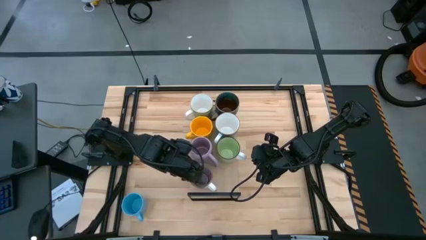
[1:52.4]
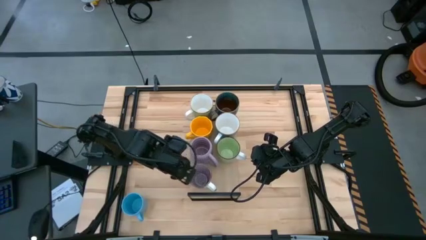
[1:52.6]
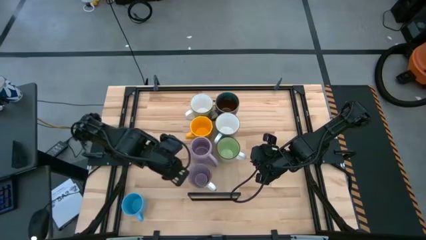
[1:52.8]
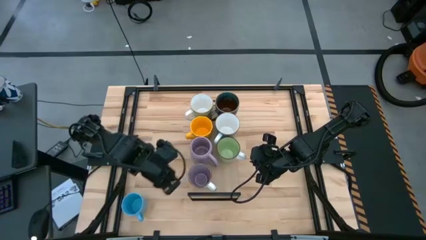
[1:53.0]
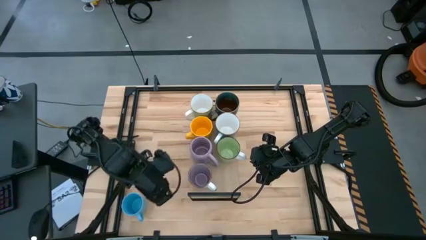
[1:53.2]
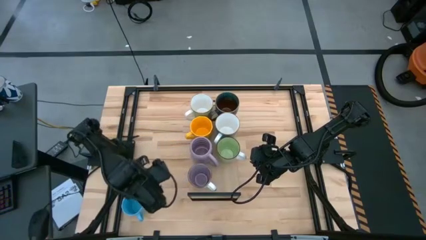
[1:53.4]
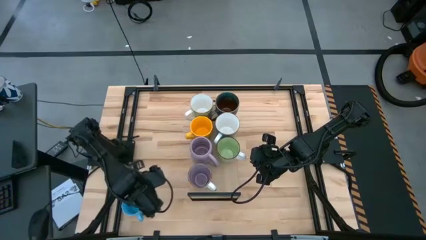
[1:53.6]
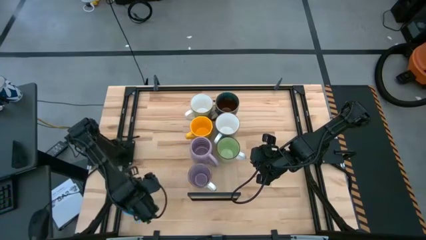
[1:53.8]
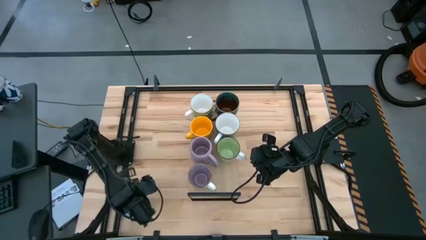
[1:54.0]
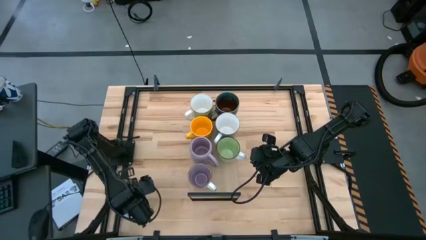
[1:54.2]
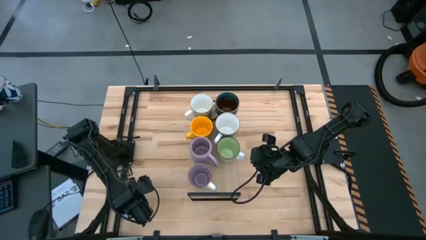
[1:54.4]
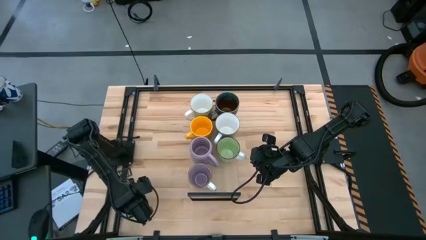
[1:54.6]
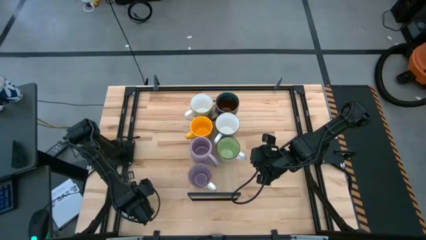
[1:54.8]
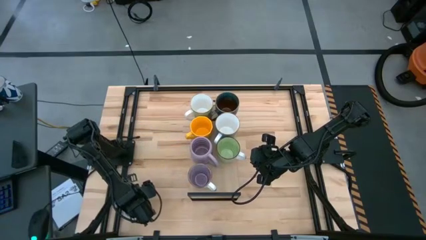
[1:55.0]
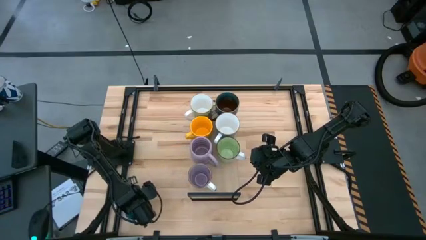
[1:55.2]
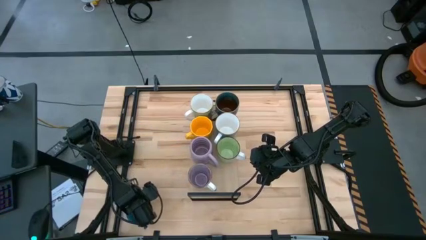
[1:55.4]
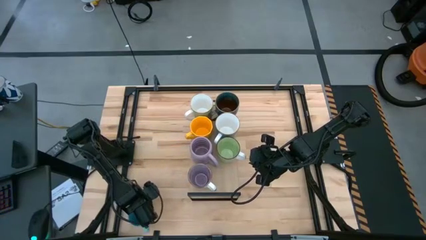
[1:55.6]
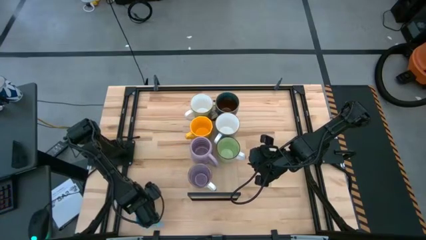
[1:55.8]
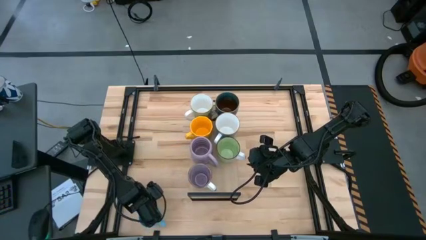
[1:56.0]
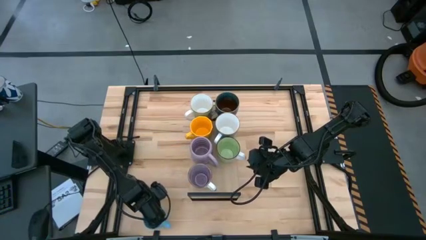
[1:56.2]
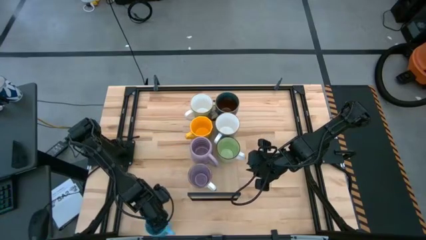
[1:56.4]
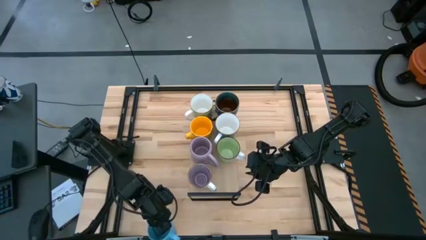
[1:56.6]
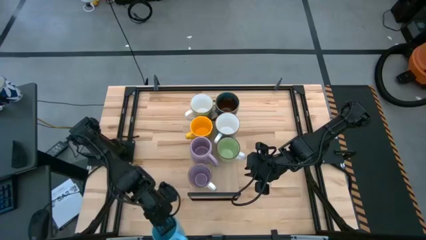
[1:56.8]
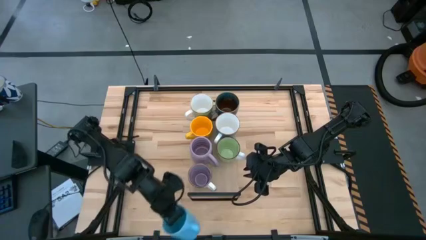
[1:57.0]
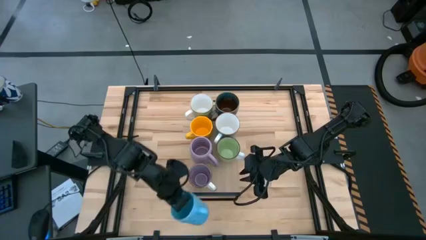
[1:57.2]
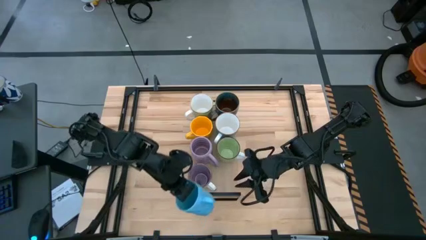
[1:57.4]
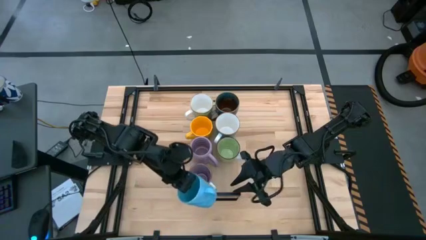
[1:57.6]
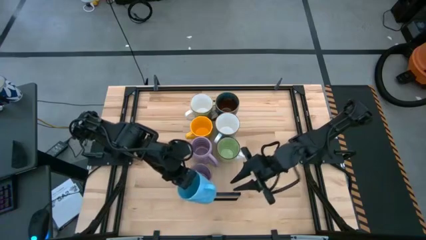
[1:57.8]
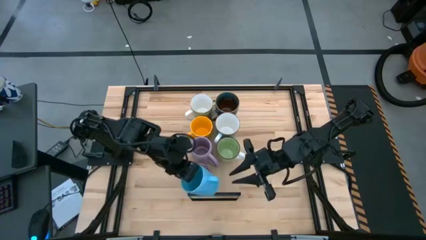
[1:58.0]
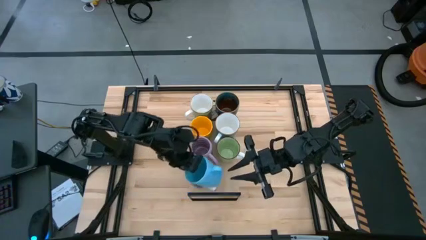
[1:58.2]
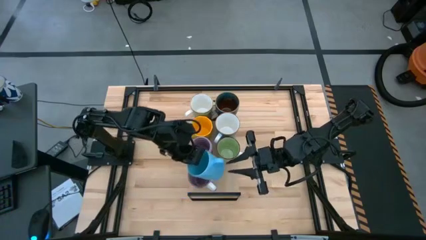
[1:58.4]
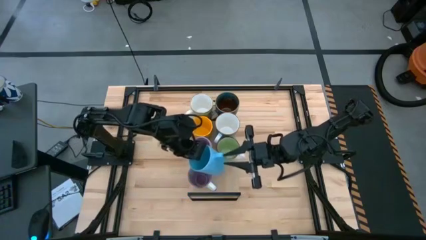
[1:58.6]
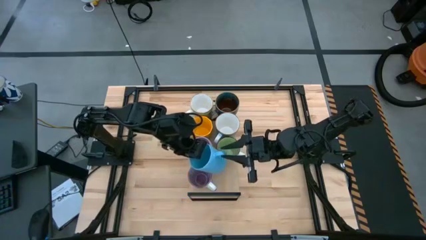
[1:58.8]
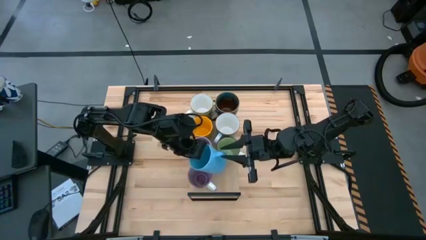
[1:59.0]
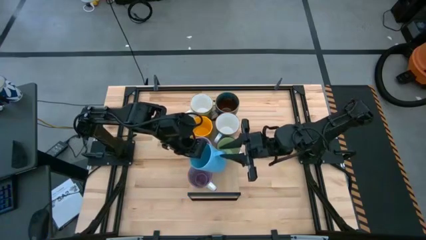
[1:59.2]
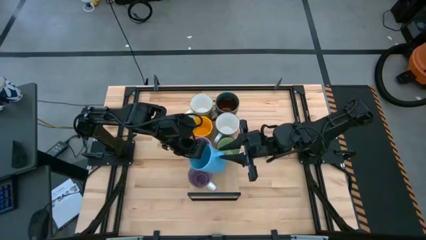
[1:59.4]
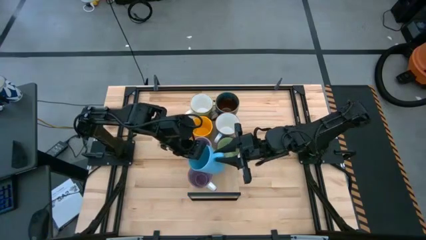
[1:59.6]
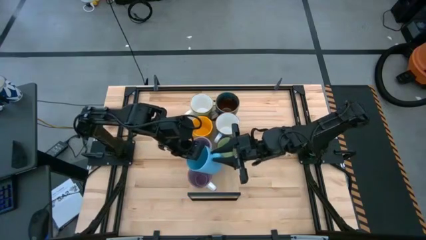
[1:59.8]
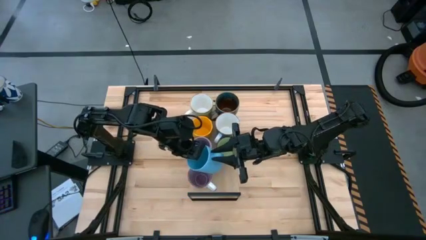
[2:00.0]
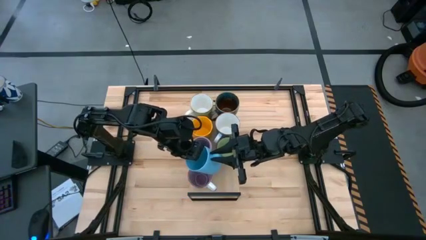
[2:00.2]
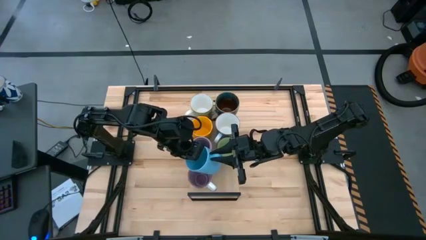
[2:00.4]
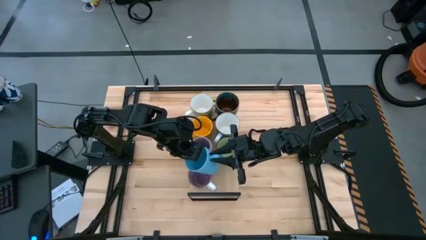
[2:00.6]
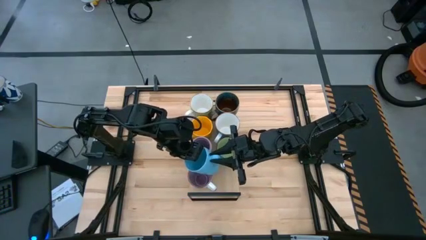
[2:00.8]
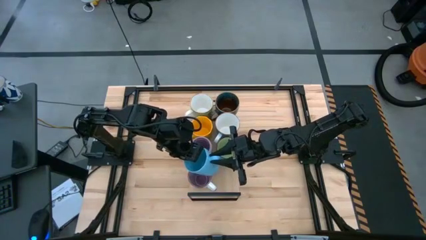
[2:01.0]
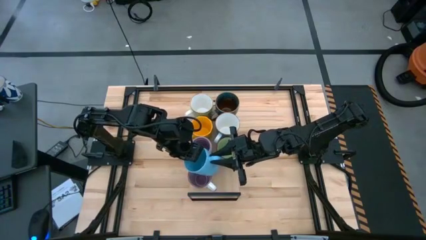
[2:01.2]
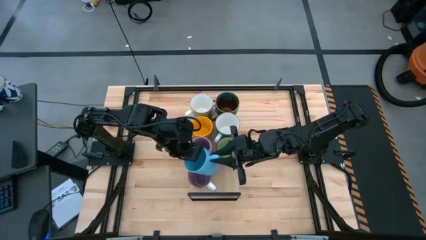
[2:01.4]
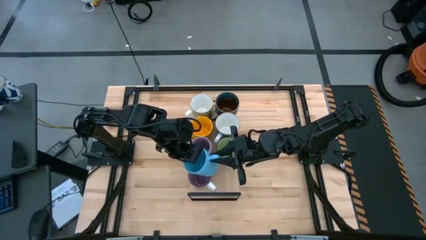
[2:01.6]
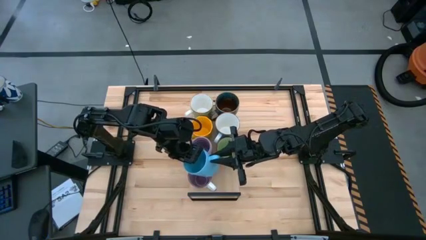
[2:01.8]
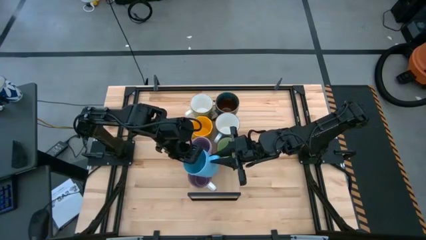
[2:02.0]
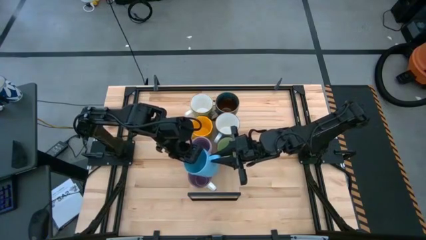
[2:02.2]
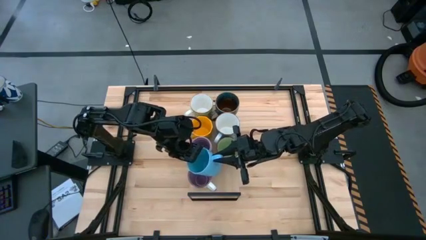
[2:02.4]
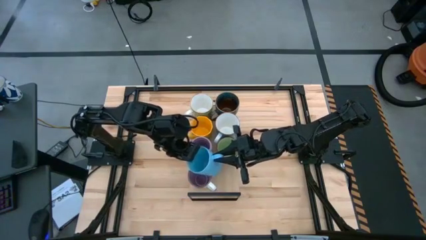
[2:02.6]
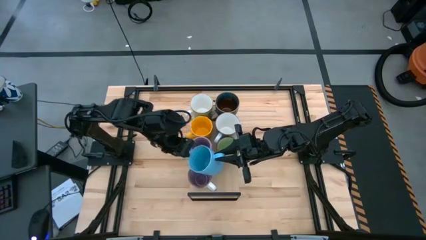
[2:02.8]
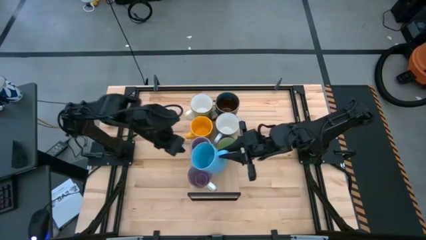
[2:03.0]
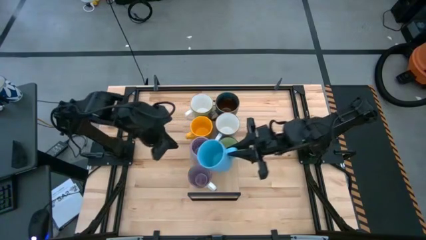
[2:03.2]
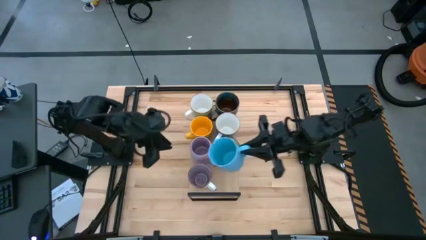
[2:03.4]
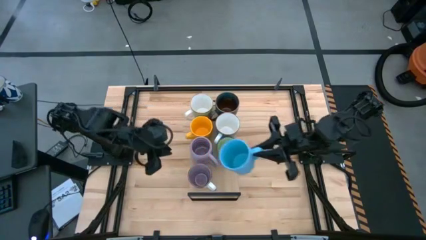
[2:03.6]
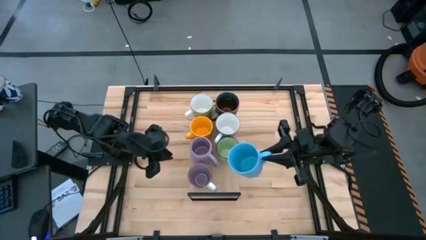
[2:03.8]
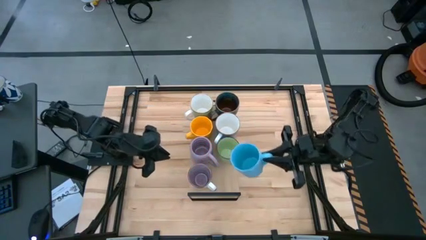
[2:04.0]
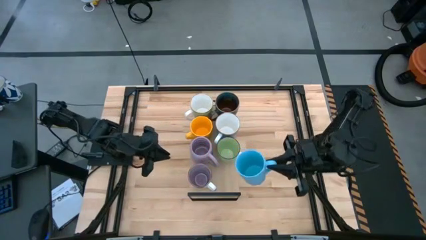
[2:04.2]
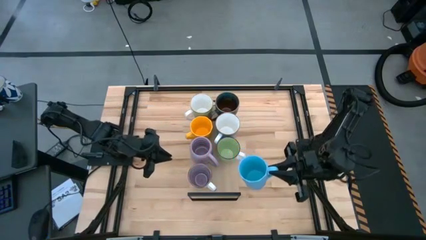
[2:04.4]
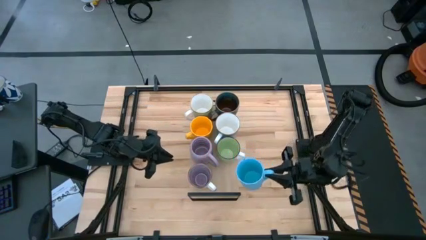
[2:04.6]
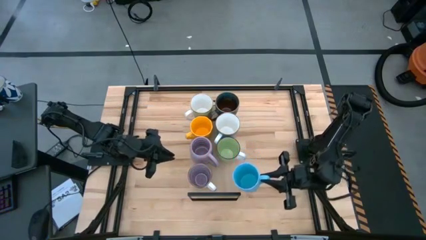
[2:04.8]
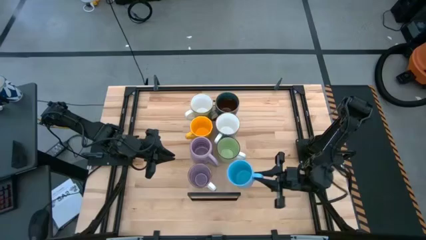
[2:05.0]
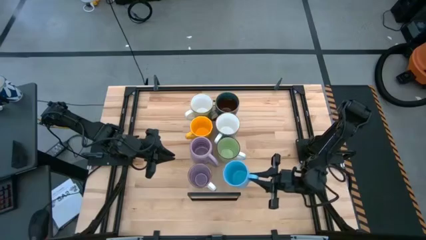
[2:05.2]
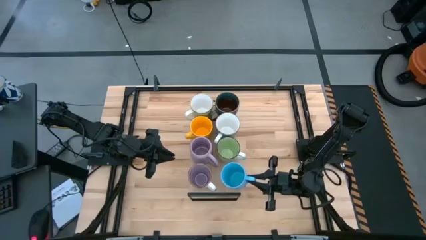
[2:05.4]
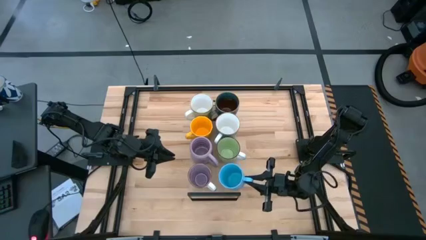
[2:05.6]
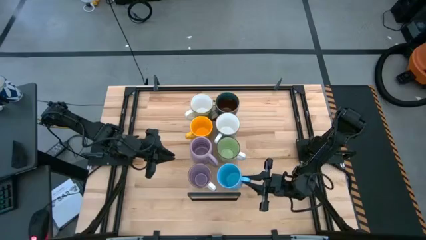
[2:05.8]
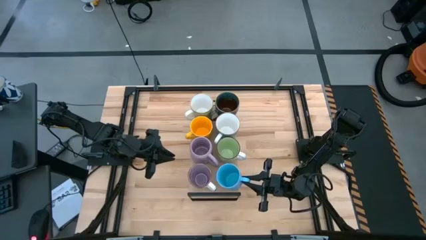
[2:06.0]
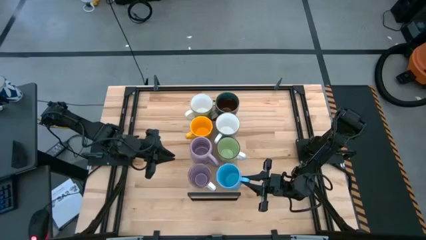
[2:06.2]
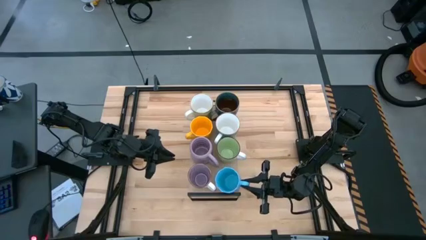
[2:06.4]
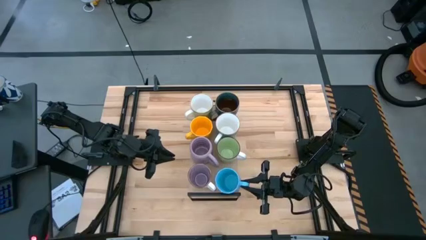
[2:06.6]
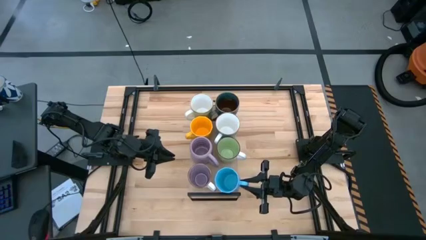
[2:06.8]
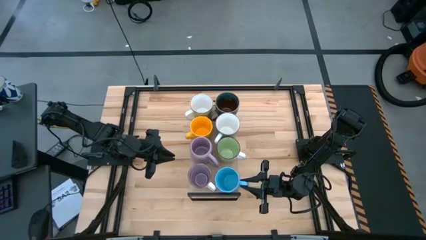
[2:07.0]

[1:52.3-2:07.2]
Task: Place coffee mugs
Put the blue mug on the shelf
